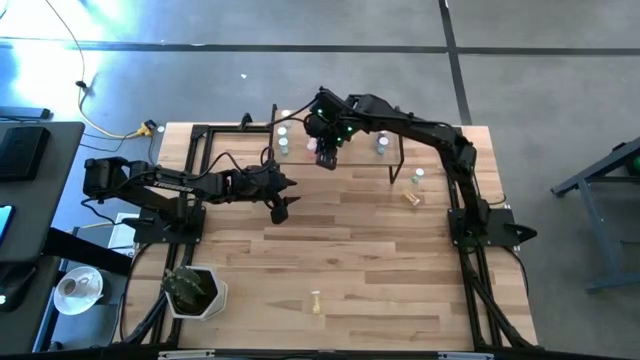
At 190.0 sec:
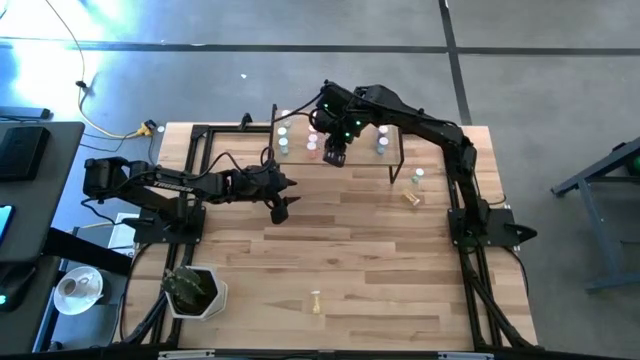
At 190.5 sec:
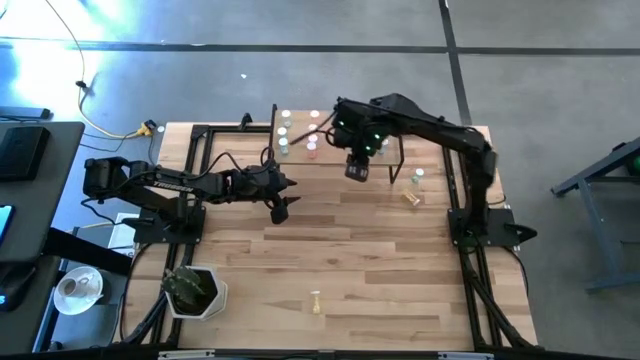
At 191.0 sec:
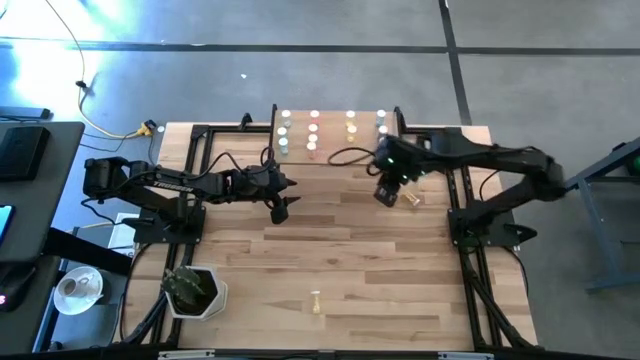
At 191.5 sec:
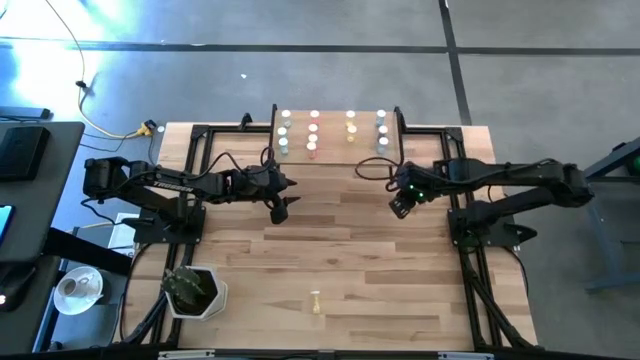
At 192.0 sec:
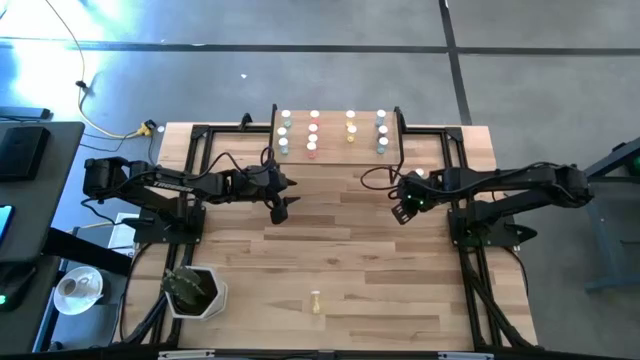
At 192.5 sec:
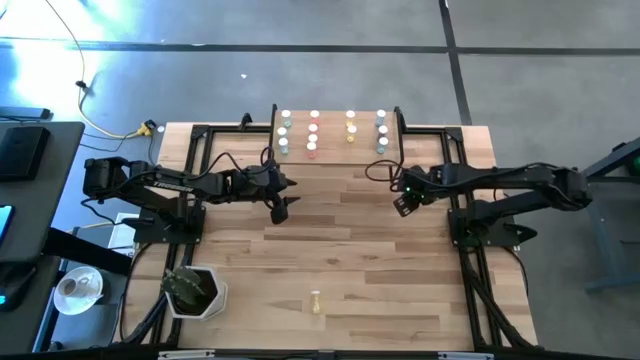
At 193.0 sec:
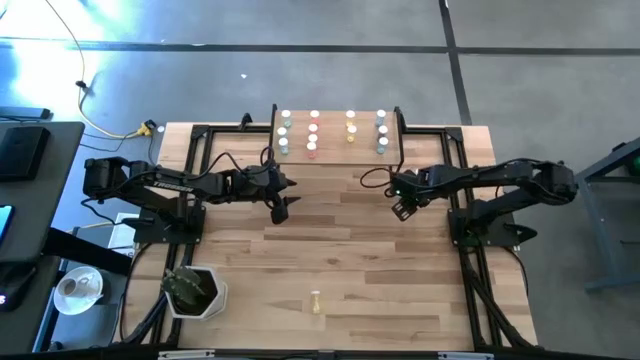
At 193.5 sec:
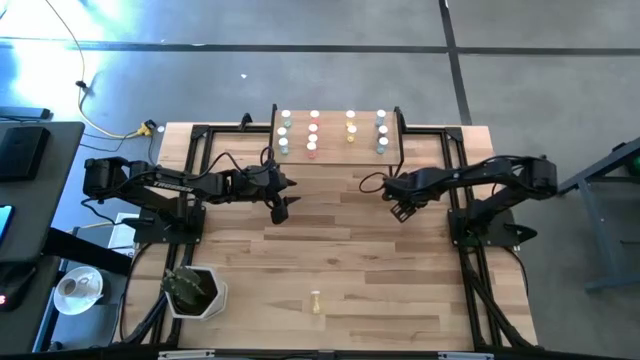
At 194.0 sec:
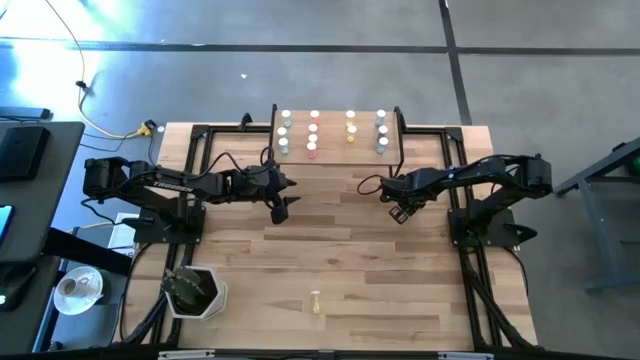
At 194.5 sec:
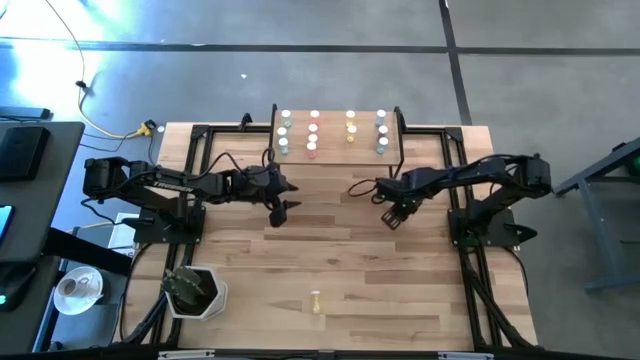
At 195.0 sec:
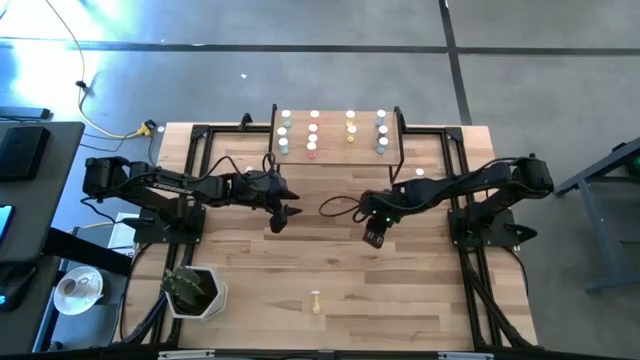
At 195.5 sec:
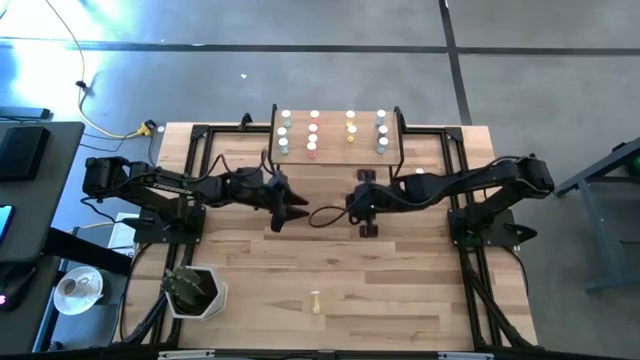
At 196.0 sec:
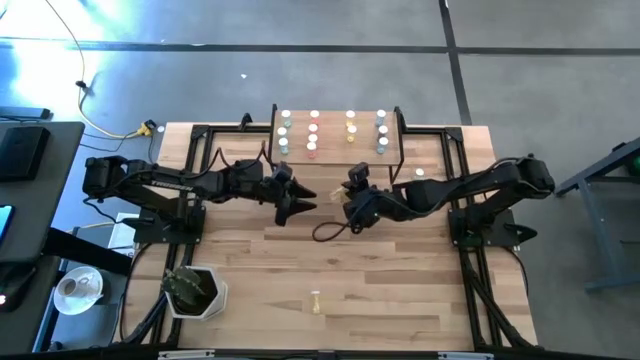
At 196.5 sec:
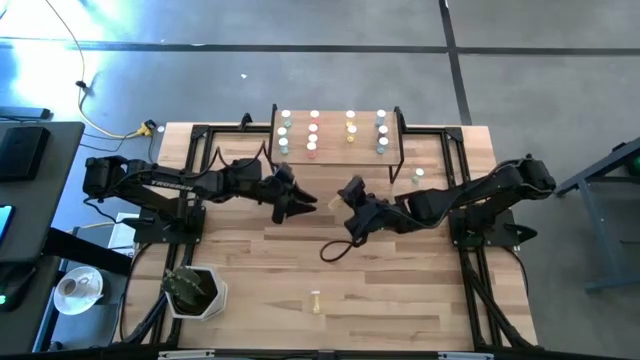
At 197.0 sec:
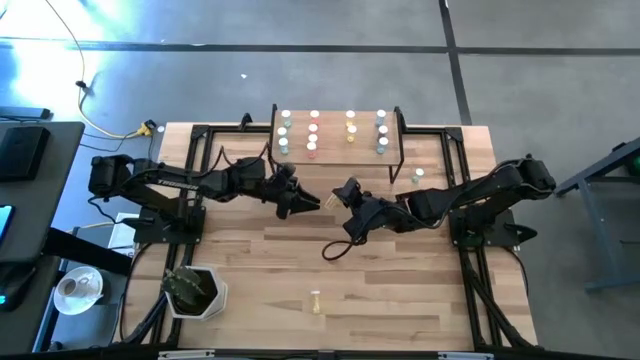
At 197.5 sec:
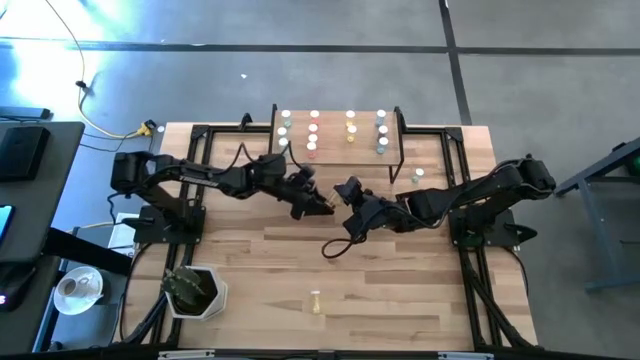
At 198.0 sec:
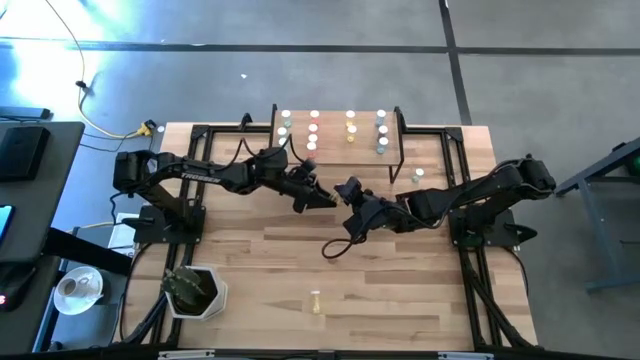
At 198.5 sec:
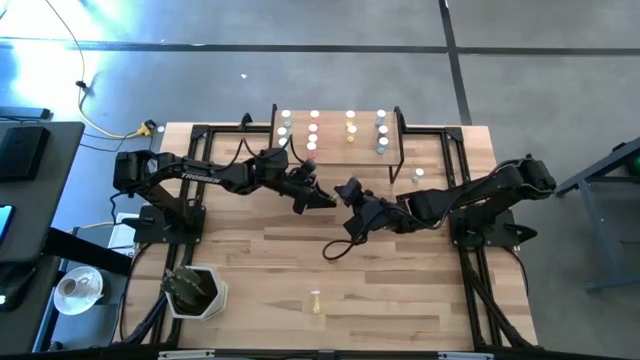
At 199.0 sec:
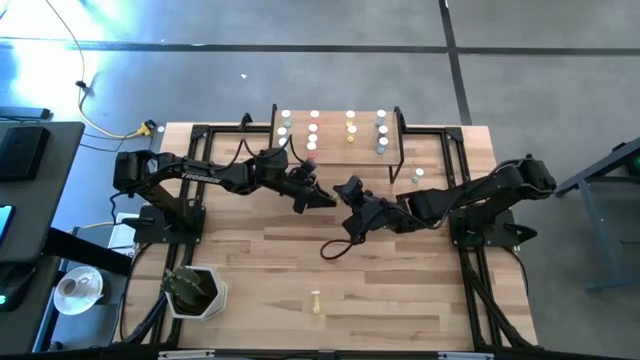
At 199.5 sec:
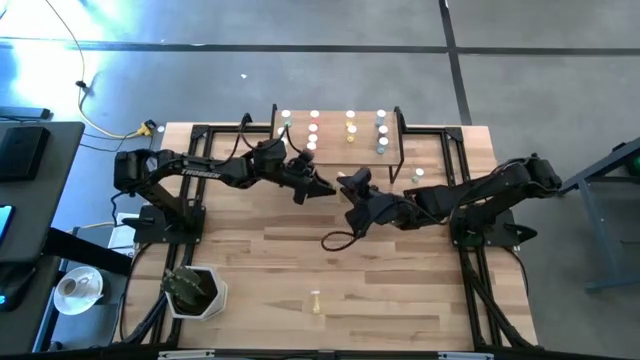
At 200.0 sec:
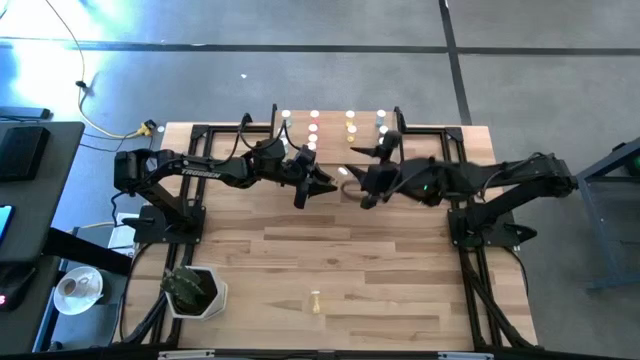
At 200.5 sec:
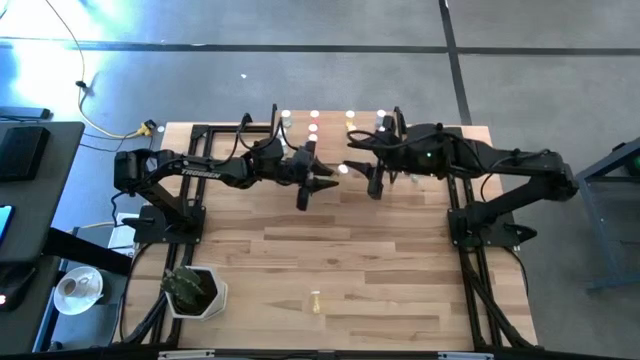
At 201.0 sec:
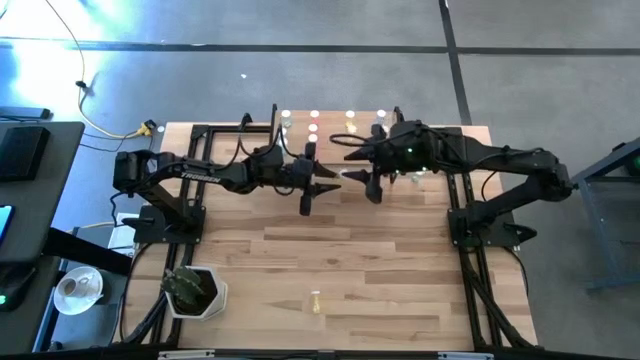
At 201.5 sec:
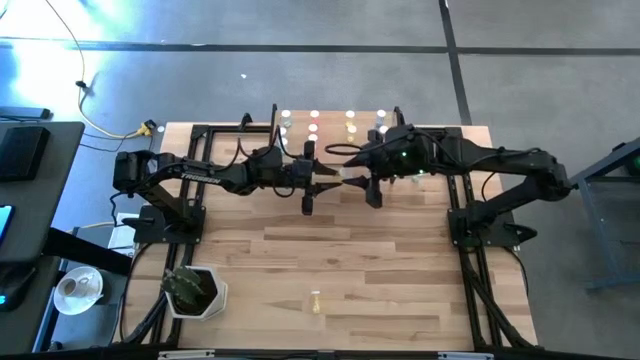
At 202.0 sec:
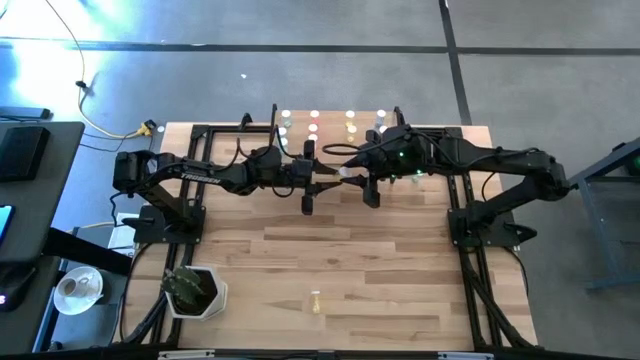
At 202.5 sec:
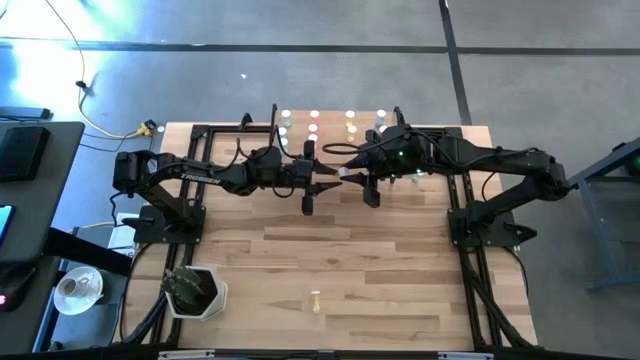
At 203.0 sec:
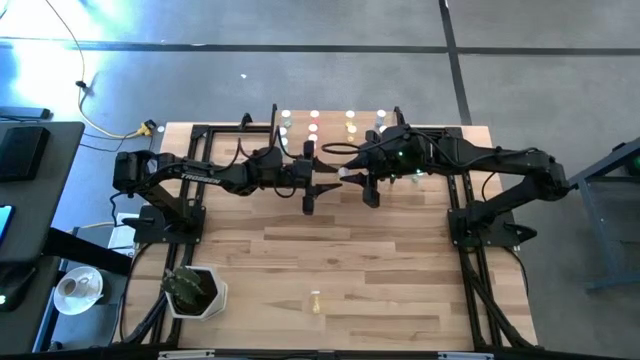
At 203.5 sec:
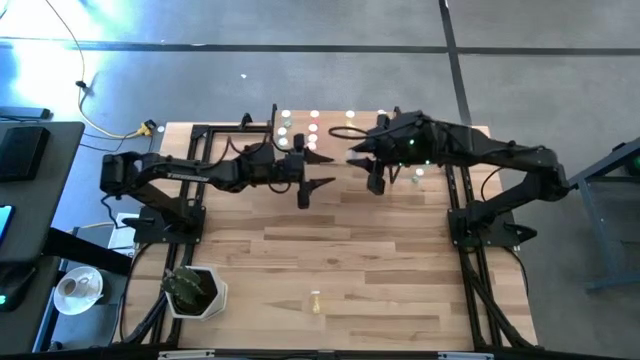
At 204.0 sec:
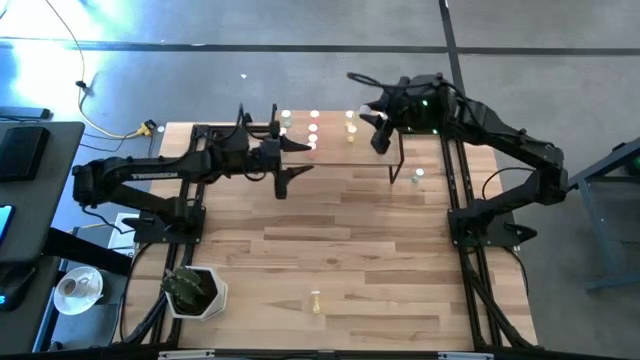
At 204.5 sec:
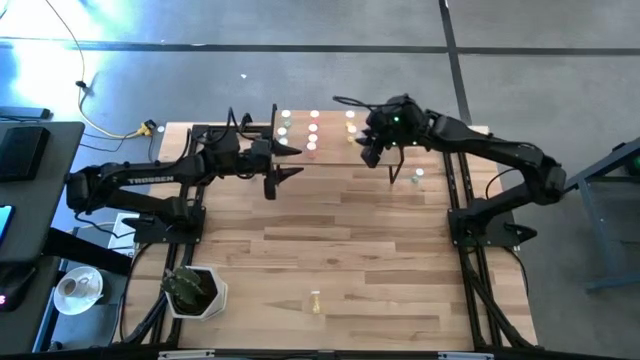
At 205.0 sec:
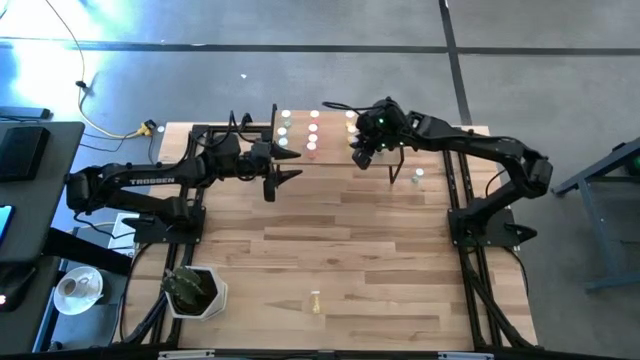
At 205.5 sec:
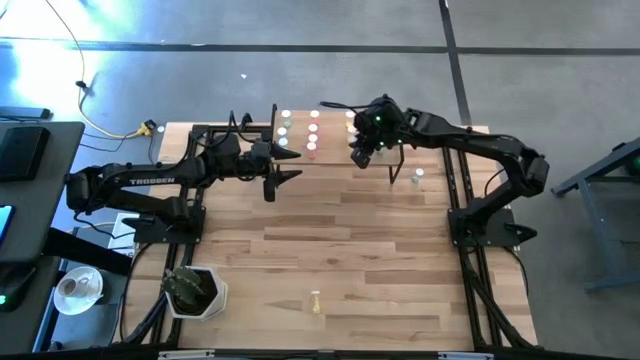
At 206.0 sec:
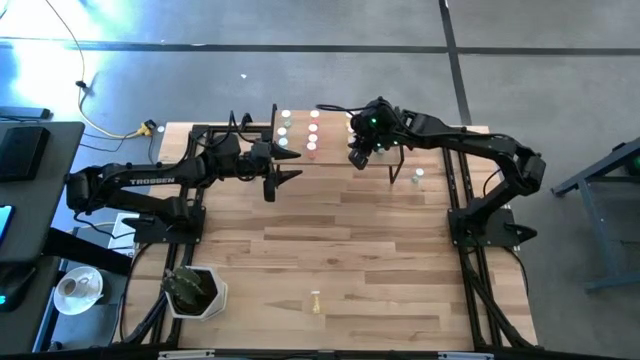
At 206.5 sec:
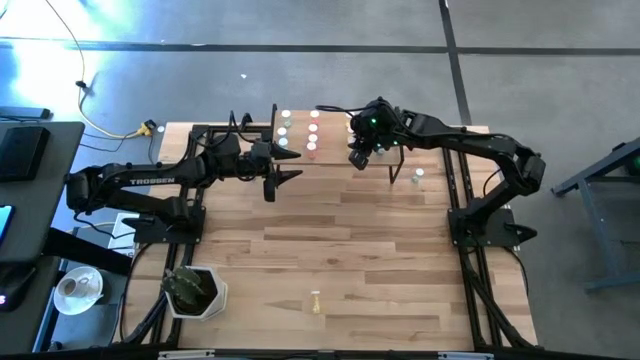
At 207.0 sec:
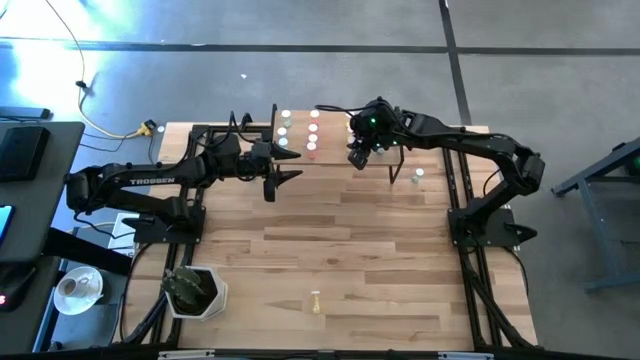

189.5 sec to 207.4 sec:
Task: Pick and place medicine bottles onto shelf by color
Put the yellow pill bottle on the shelf

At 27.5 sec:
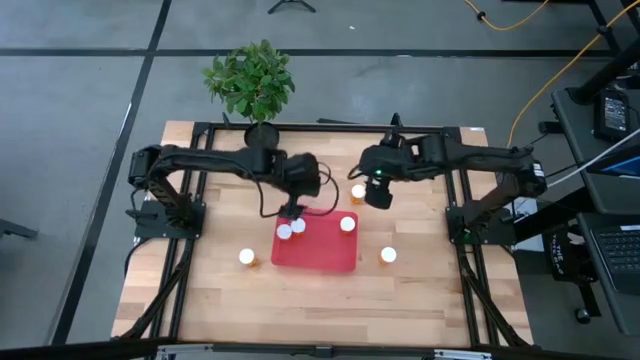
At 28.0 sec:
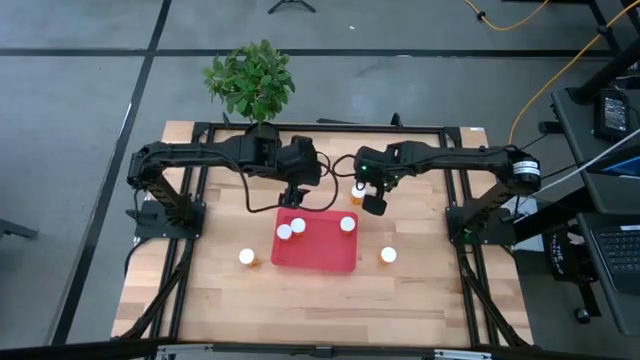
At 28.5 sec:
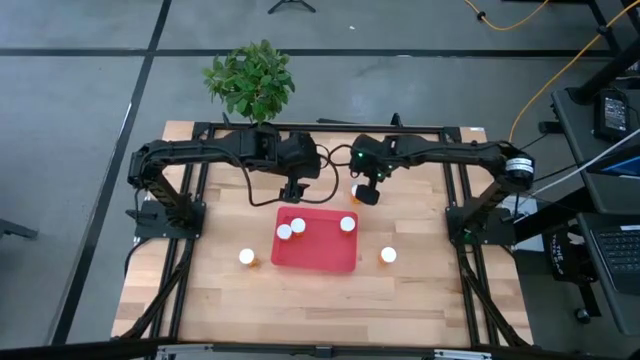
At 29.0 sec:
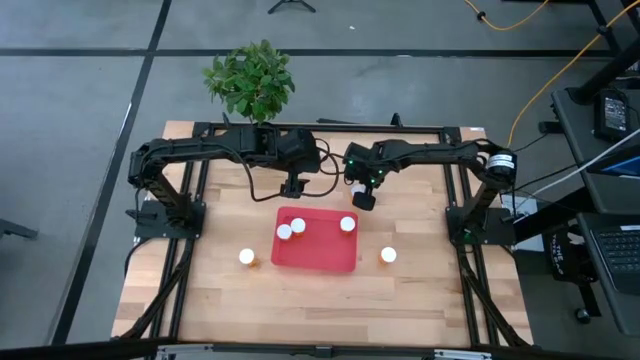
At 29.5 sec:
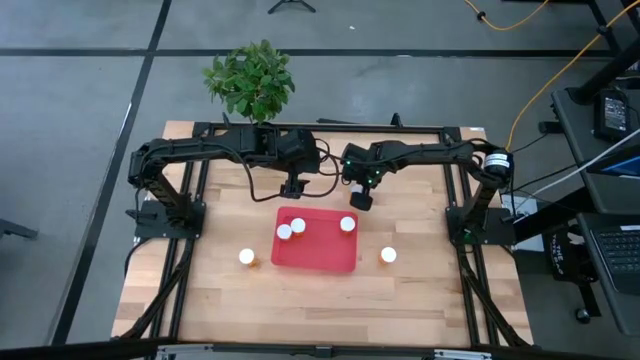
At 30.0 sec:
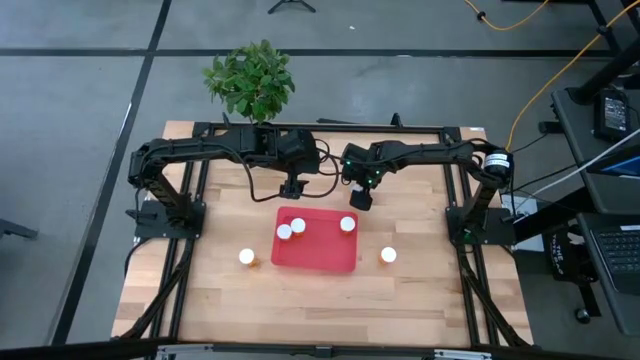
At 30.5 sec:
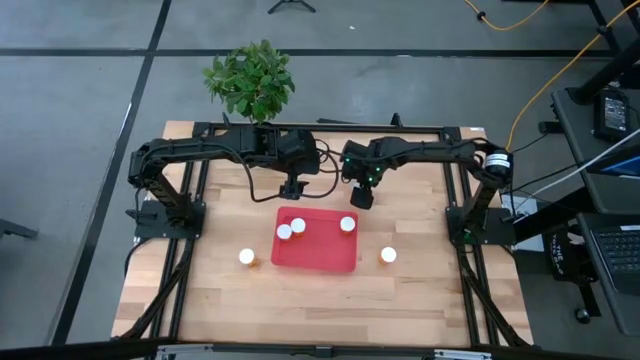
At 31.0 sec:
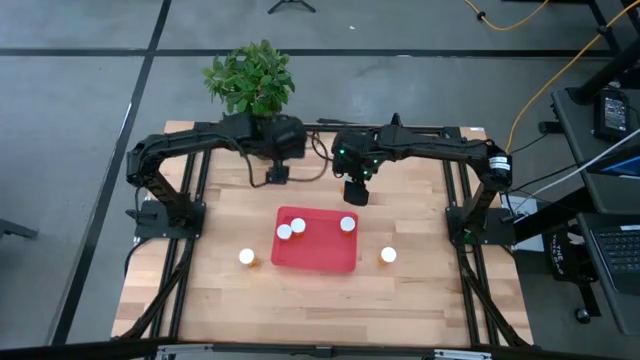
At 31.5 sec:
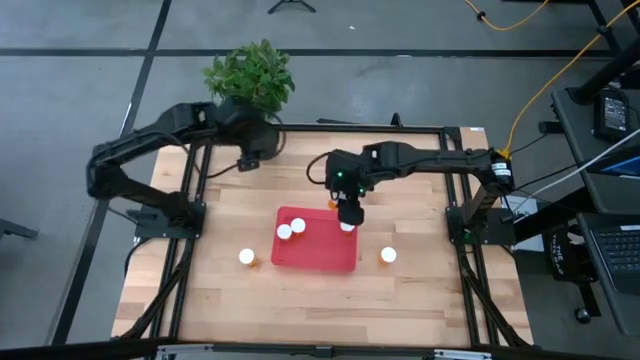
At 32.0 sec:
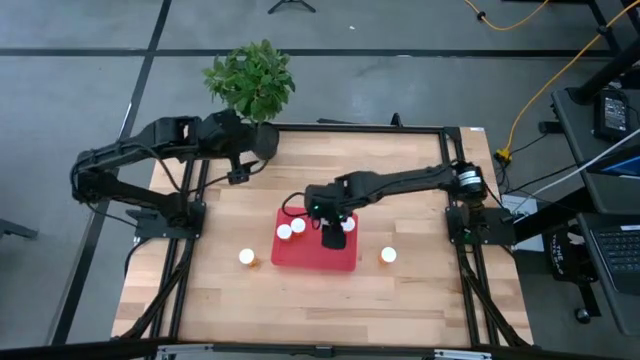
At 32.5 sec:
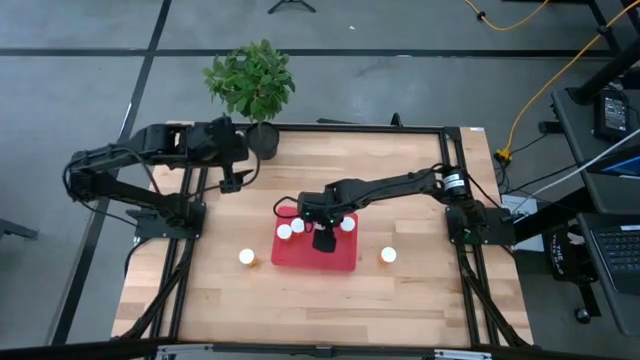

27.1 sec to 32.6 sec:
Task: Pick and place pill bottles into a basket
Put the top orange pill bottle into the bin
